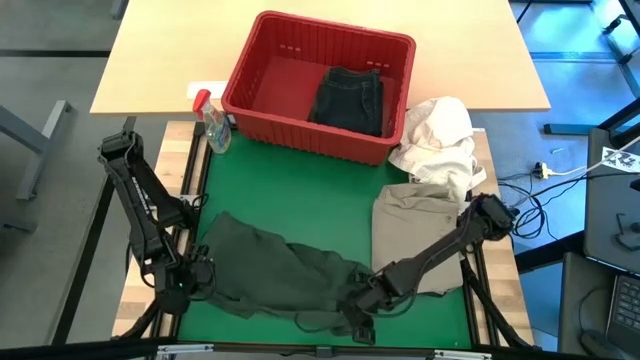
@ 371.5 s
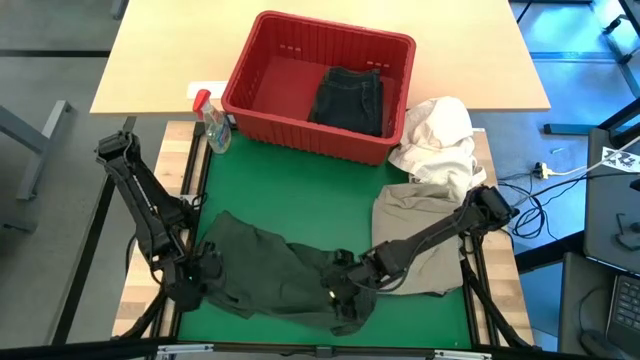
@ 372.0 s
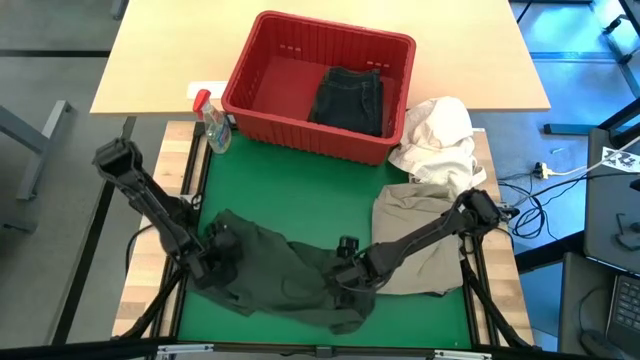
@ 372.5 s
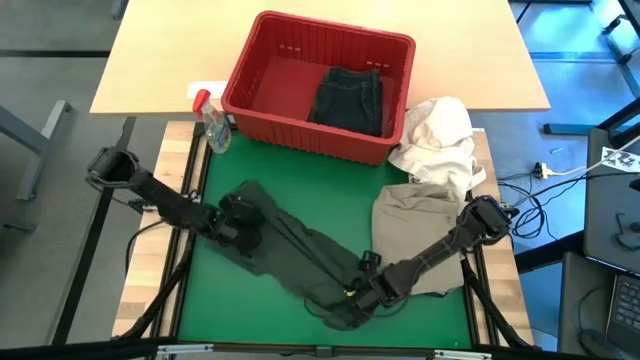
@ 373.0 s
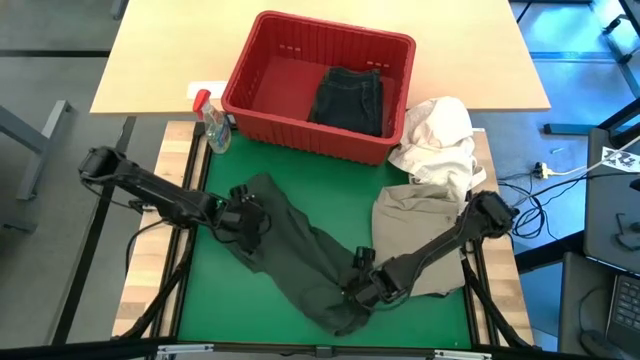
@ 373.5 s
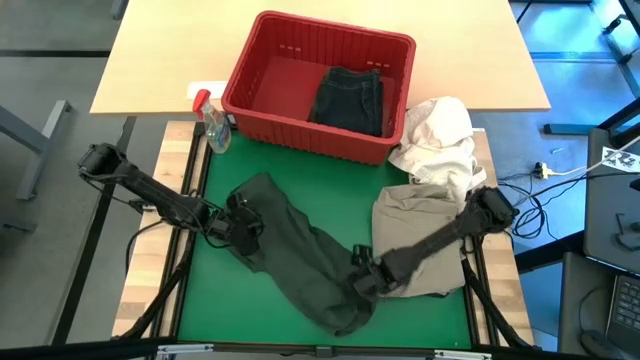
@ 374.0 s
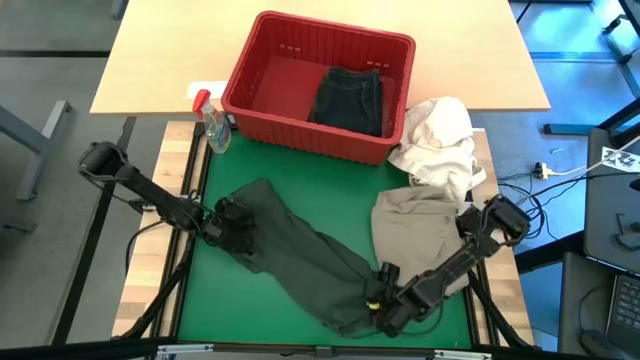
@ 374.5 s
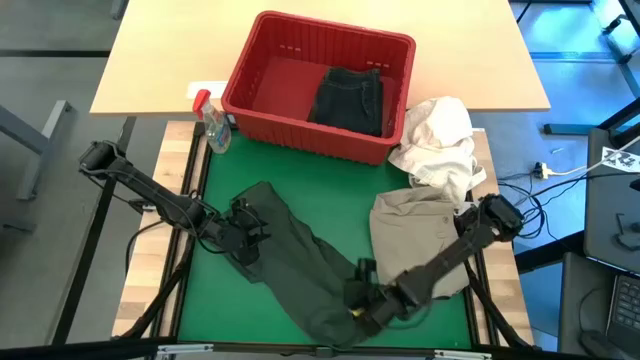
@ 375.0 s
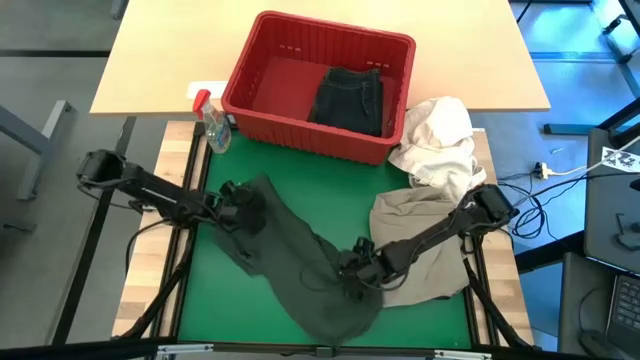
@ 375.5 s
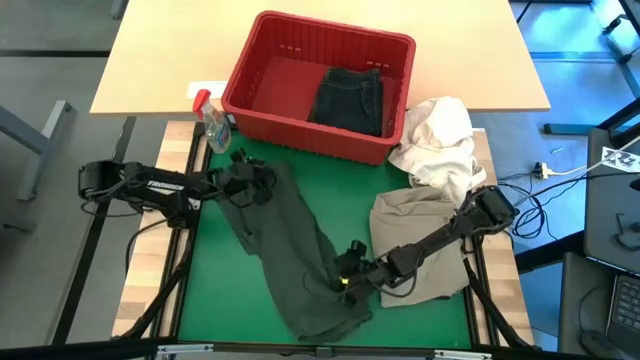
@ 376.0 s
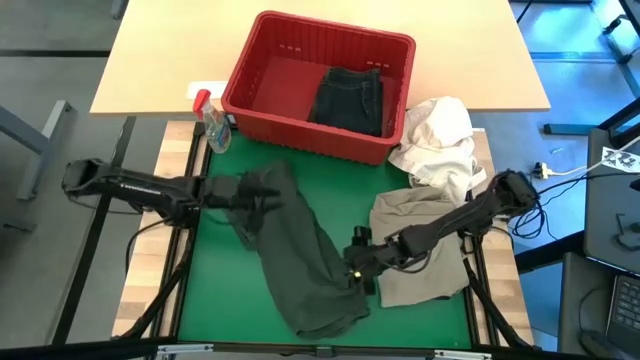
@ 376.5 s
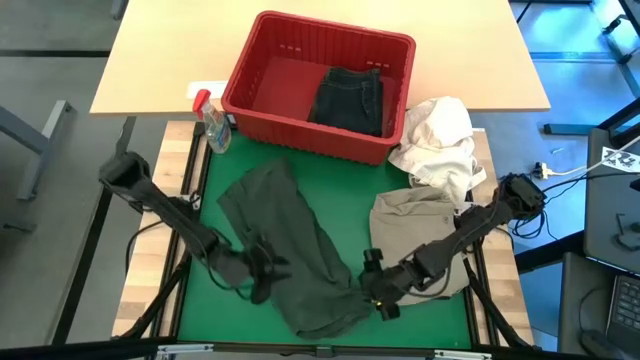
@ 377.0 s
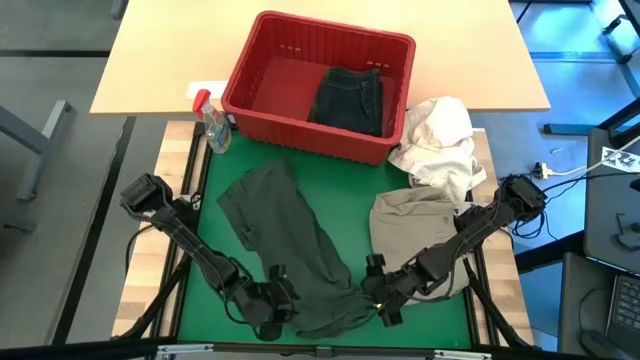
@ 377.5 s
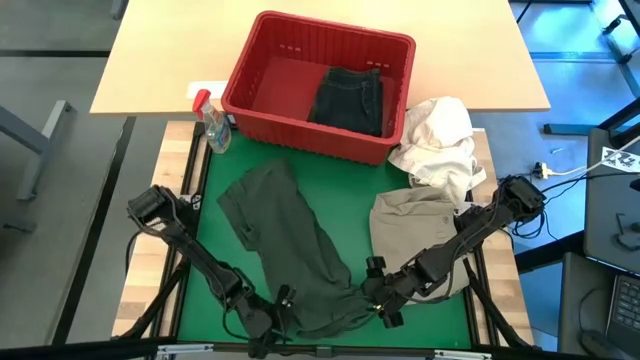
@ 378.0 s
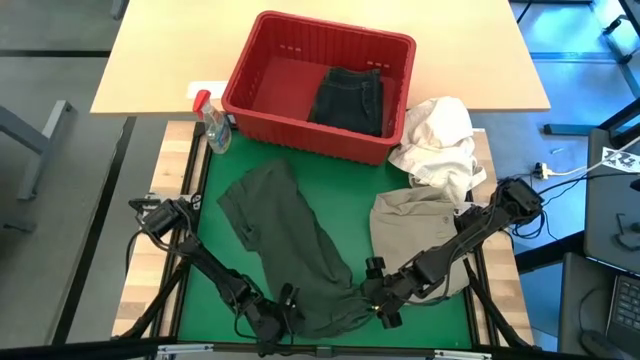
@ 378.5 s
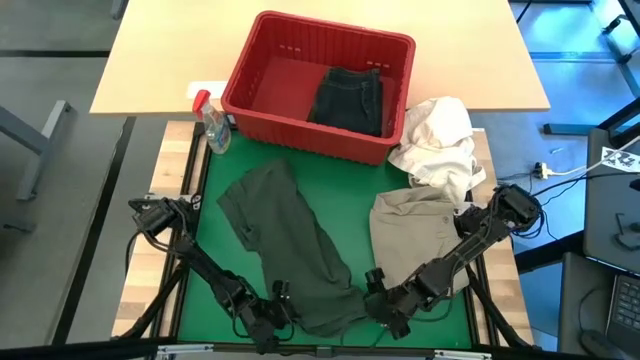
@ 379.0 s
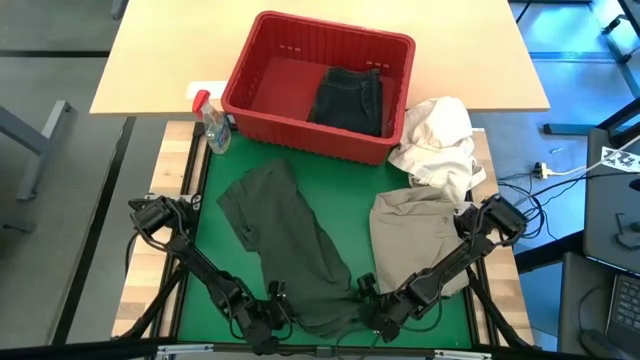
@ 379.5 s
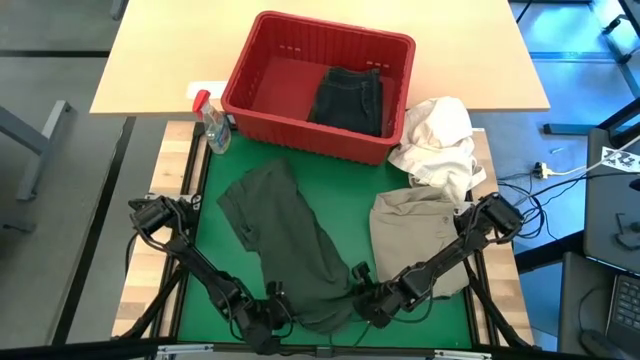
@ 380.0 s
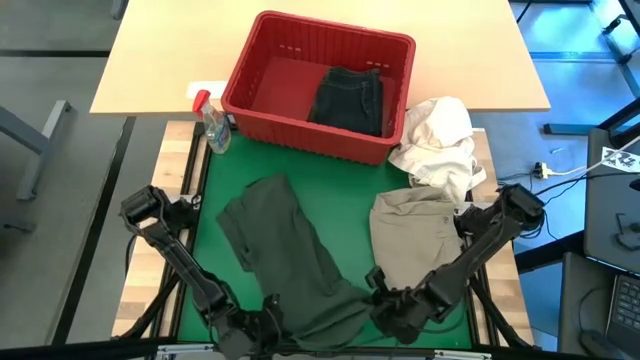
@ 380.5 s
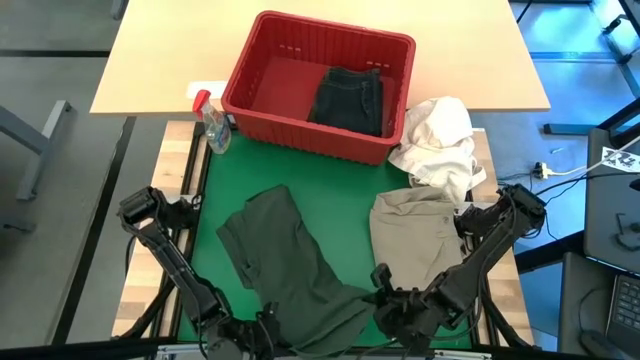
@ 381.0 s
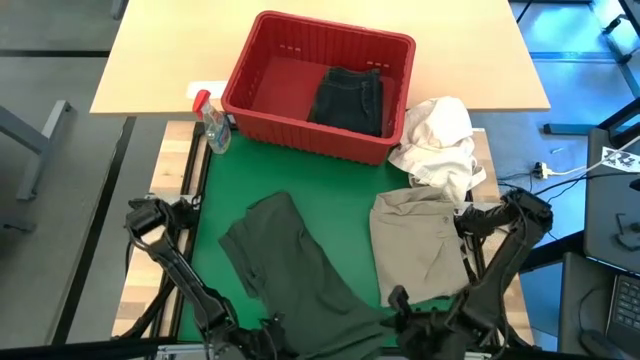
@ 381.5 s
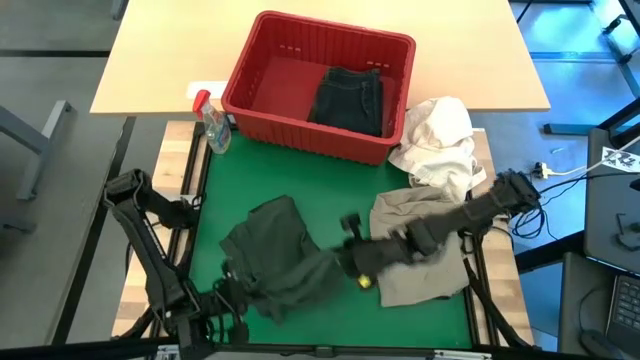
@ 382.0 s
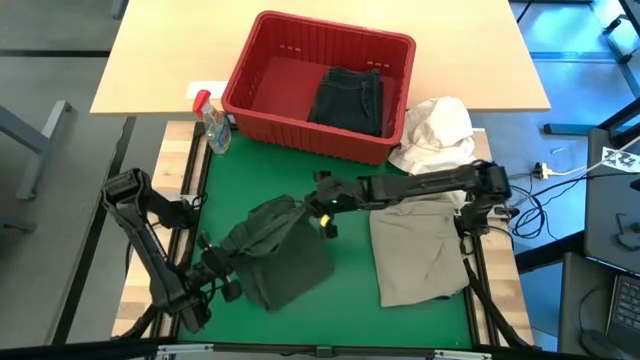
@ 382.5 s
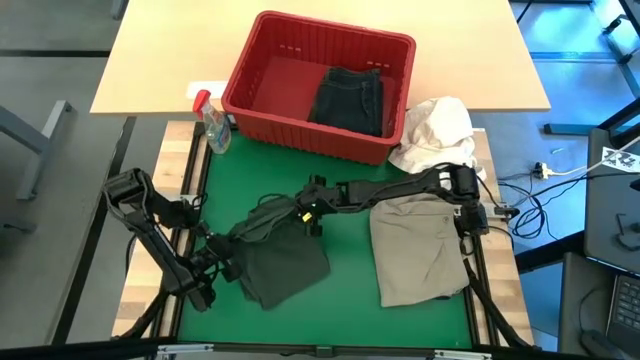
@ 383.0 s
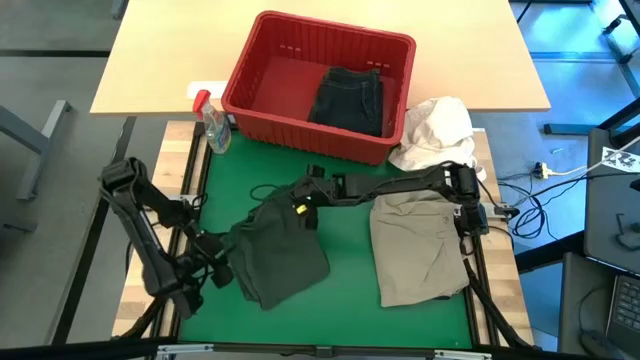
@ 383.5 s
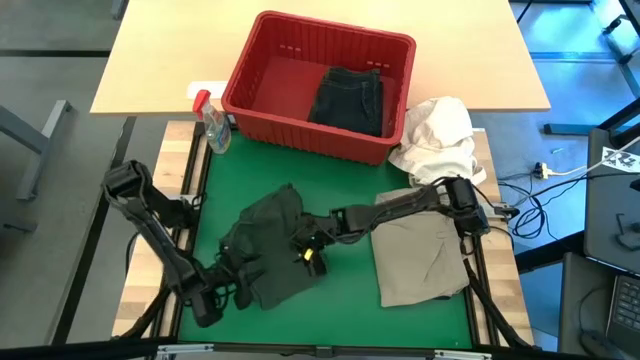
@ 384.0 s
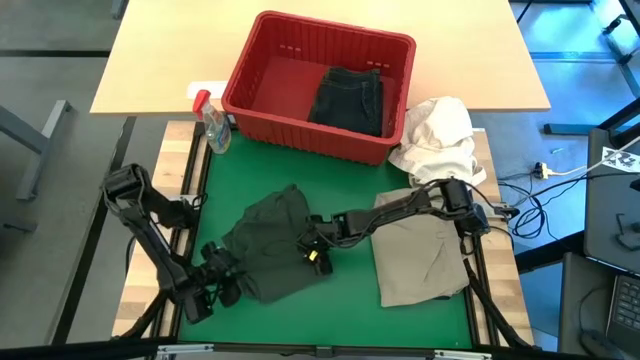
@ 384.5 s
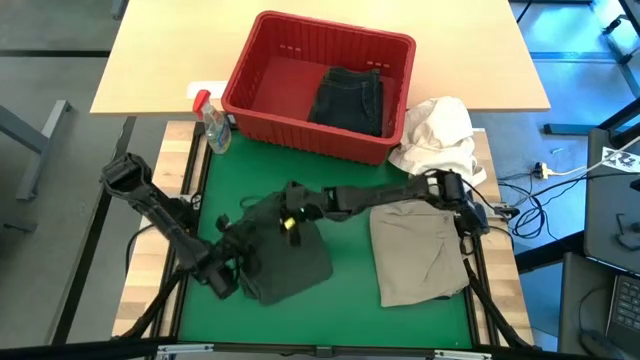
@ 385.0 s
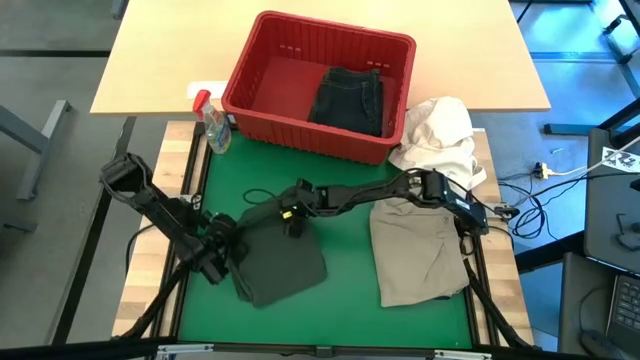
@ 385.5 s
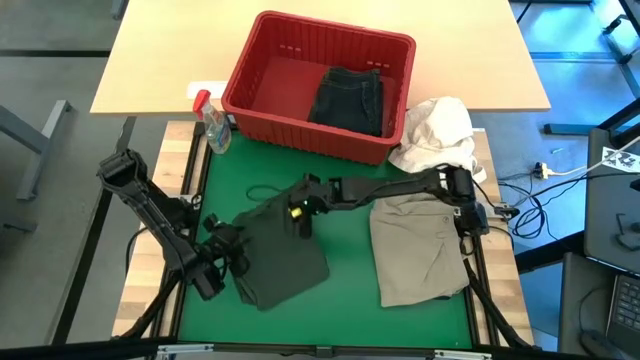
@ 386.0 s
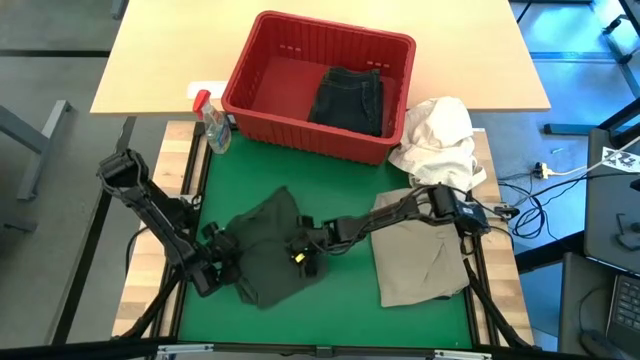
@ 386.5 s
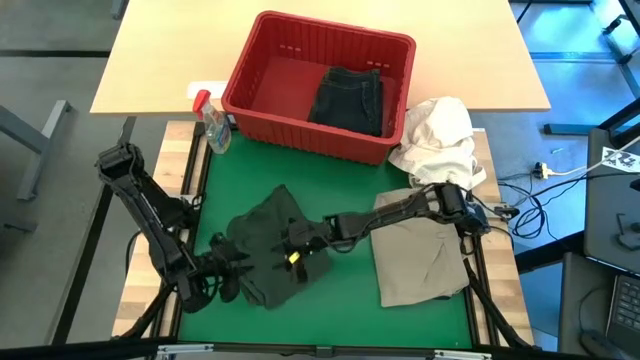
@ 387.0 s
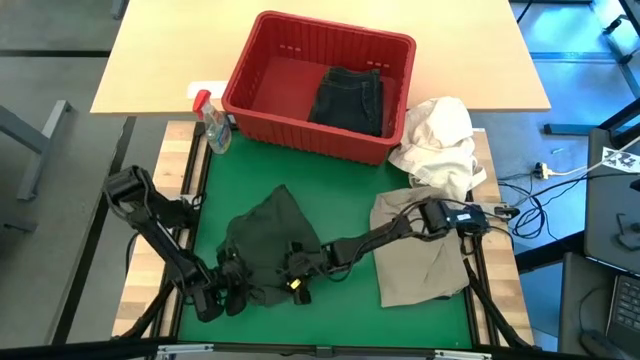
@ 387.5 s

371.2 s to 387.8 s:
Task: Fold Laundry from Bin
Fold the green polo shirt

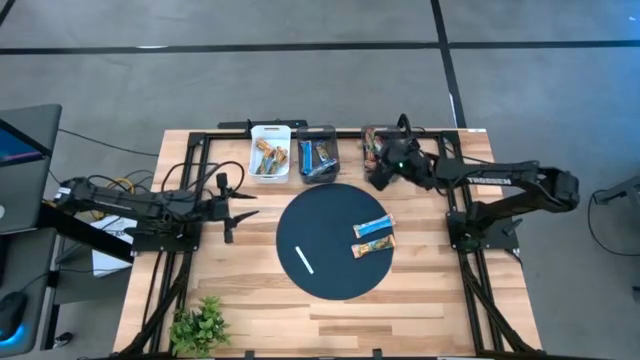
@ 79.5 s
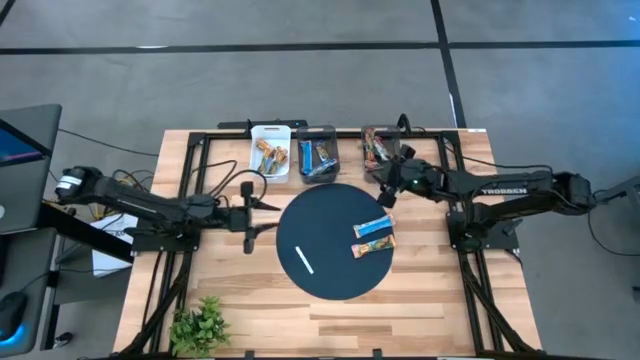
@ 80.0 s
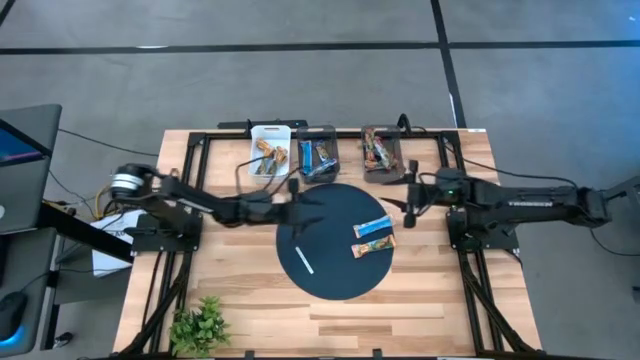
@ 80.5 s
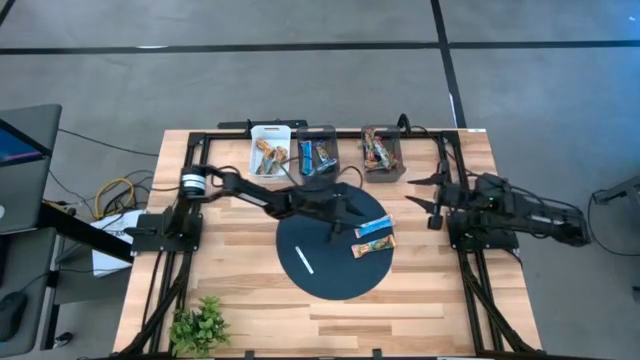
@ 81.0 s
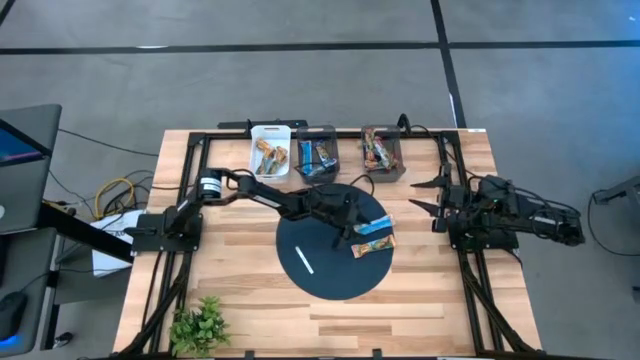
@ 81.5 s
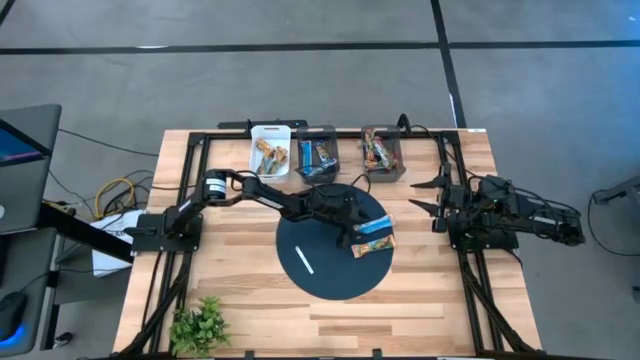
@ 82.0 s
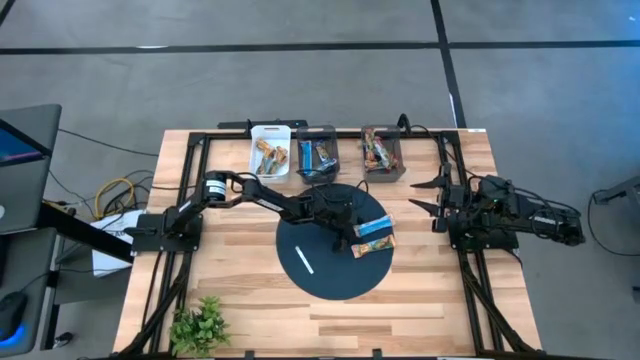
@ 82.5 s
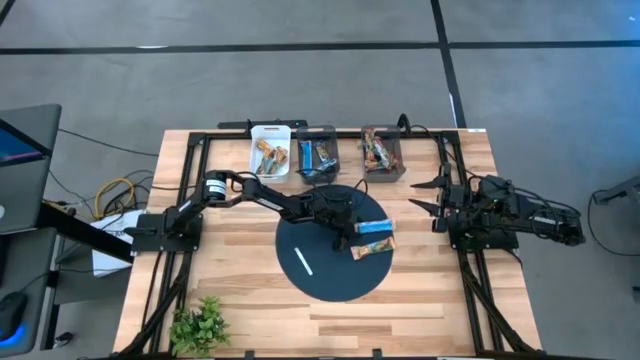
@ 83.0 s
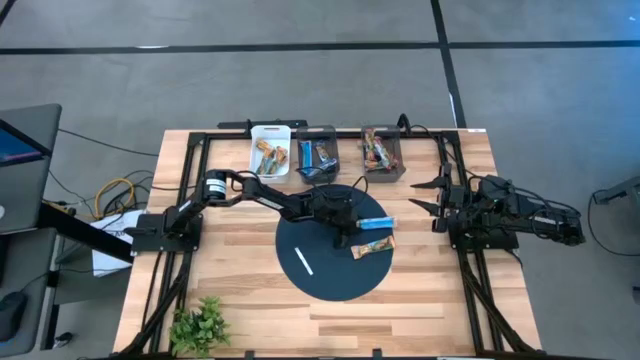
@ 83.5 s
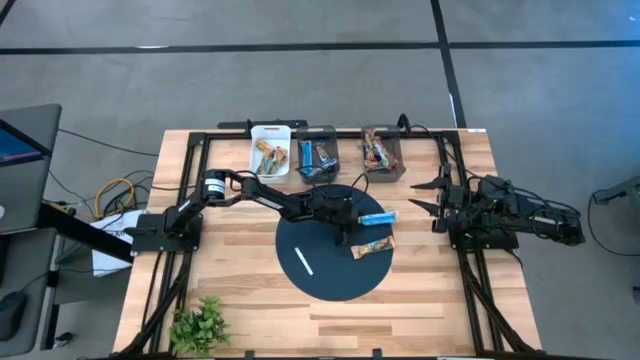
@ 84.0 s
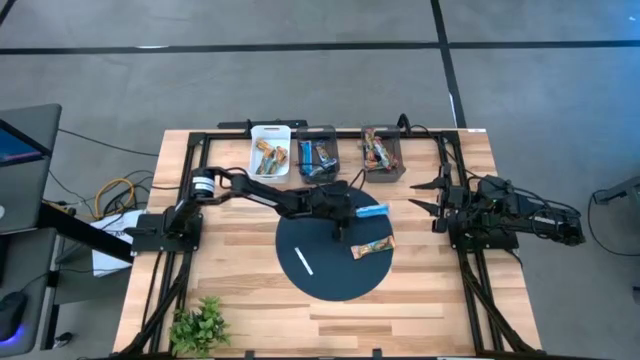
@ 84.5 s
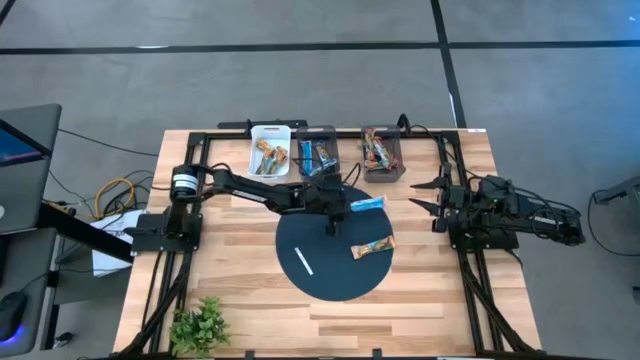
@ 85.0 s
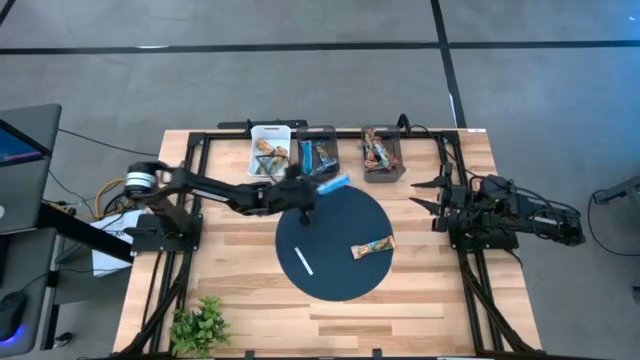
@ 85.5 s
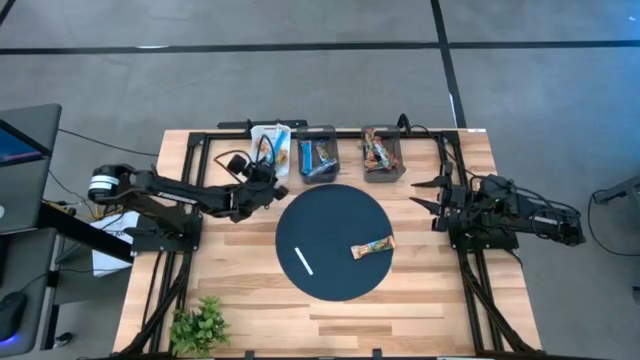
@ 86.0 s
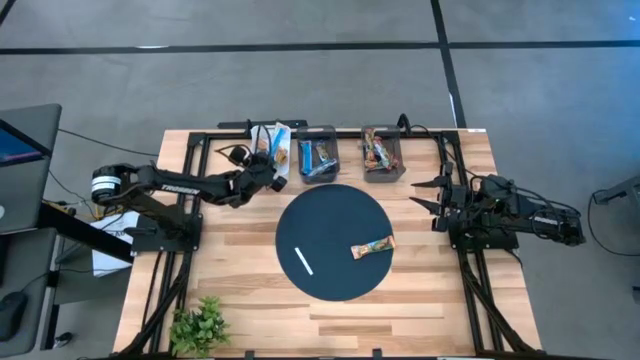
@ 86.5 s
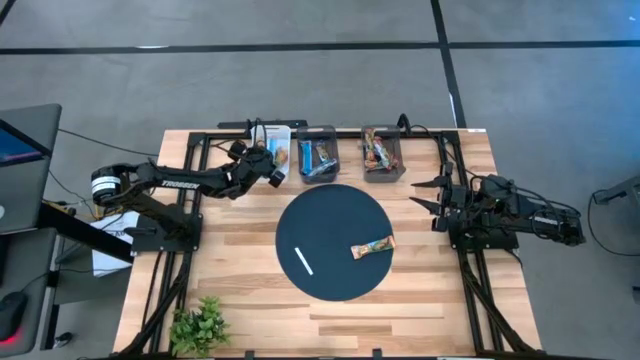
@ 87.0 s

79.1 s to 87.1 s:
Task: Pick and place Granola Bars by type
Put the orange granola bar into the white bin
